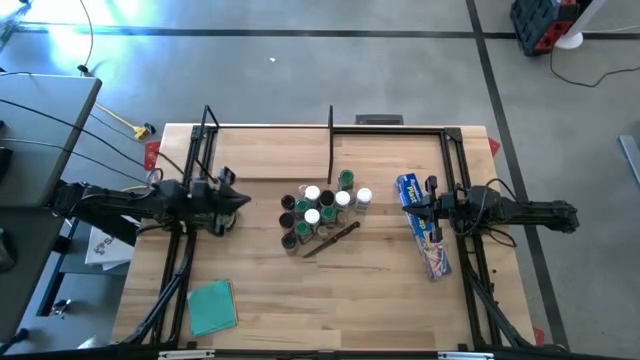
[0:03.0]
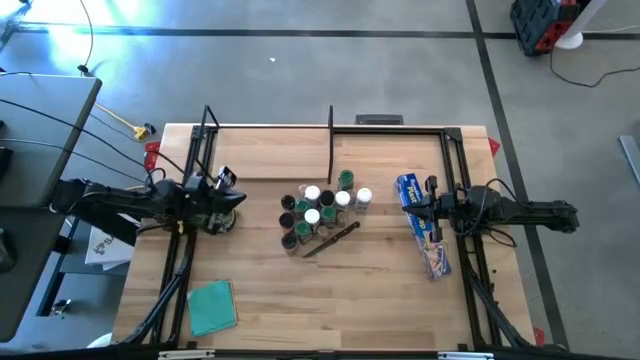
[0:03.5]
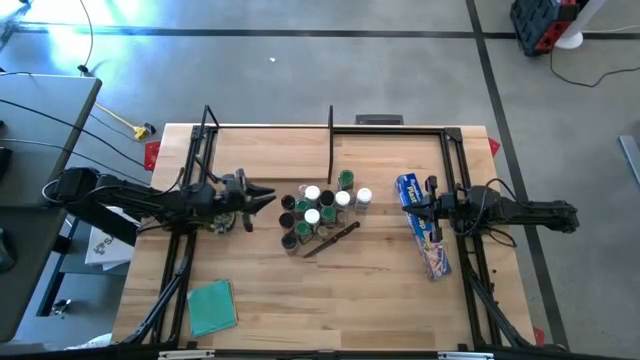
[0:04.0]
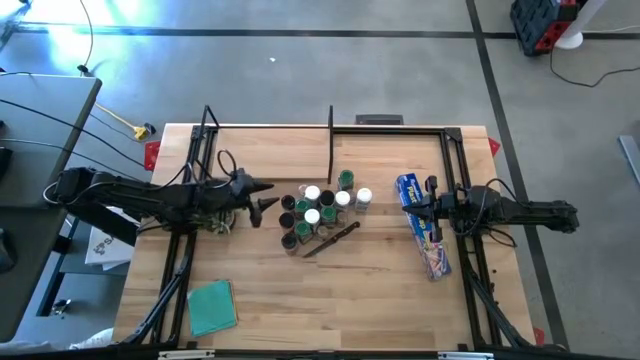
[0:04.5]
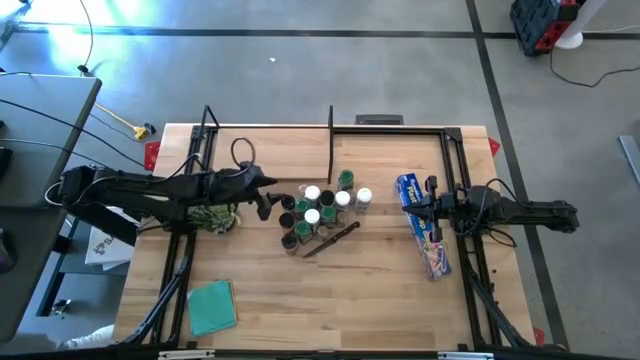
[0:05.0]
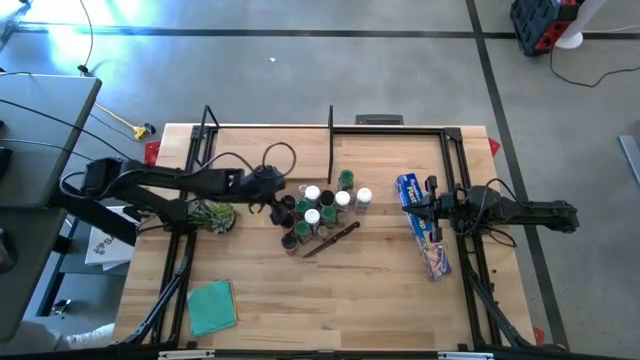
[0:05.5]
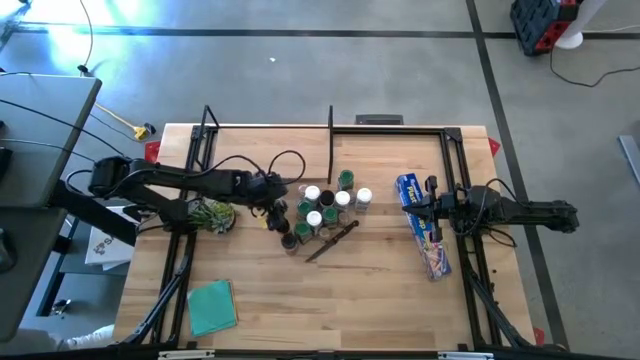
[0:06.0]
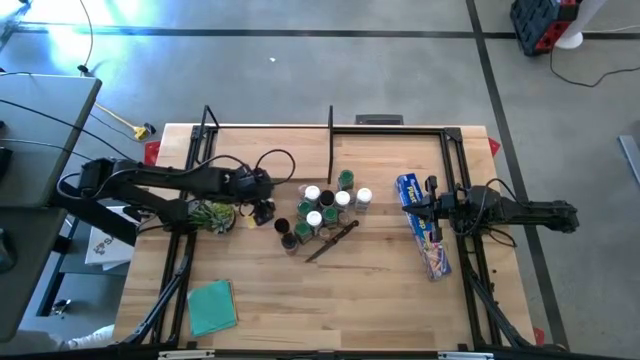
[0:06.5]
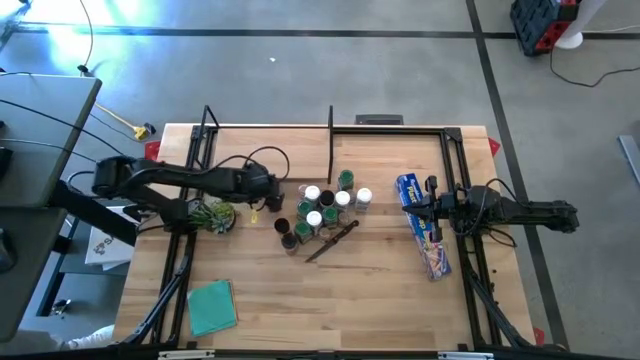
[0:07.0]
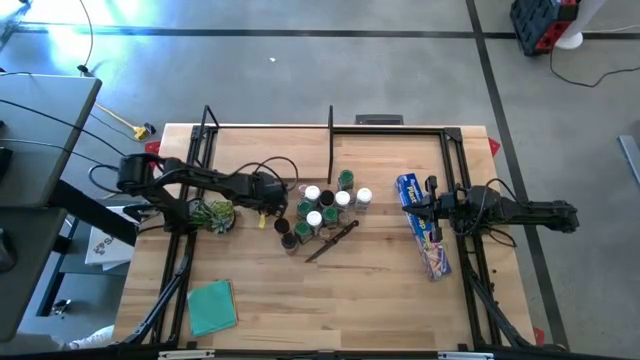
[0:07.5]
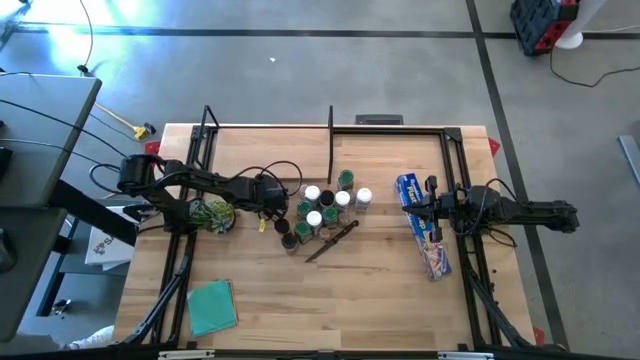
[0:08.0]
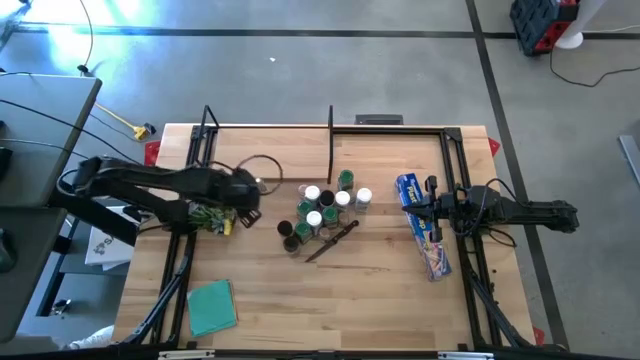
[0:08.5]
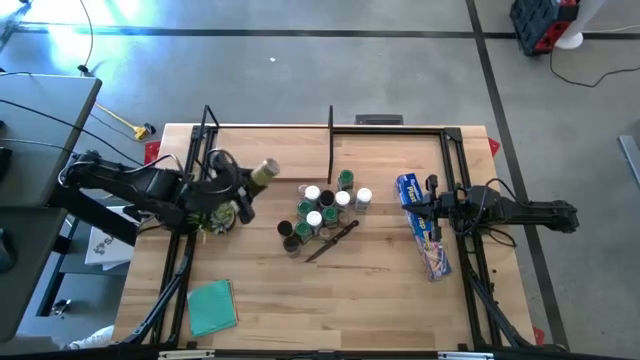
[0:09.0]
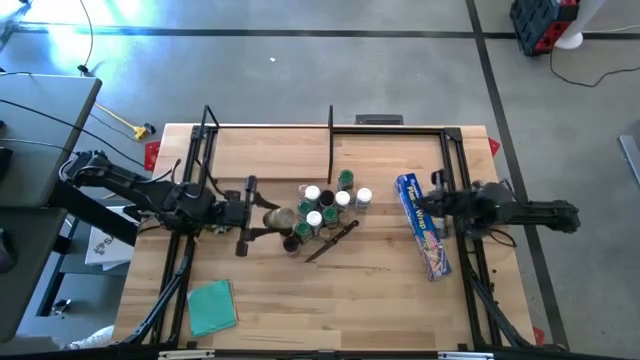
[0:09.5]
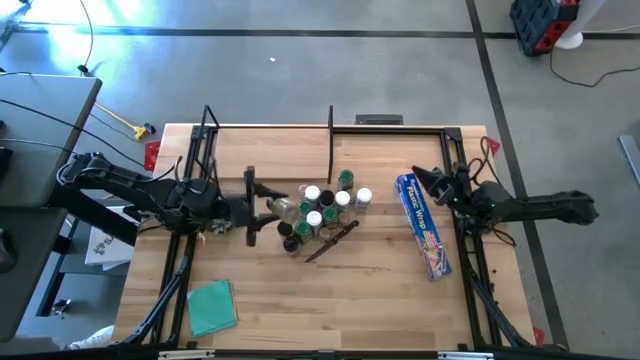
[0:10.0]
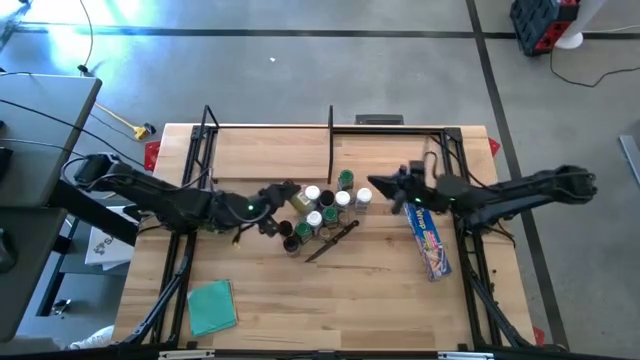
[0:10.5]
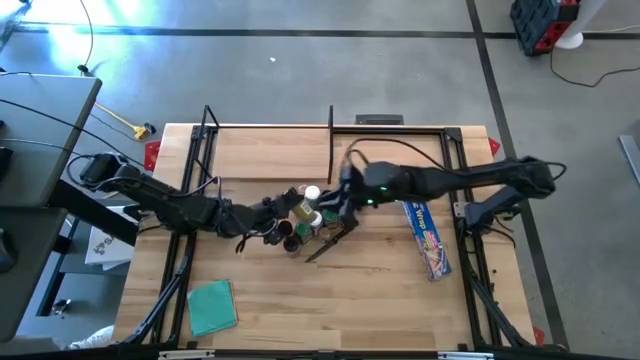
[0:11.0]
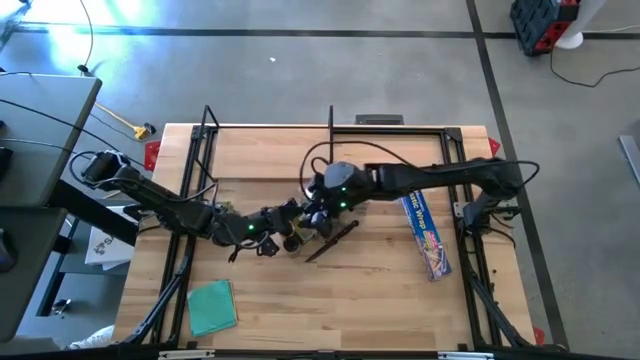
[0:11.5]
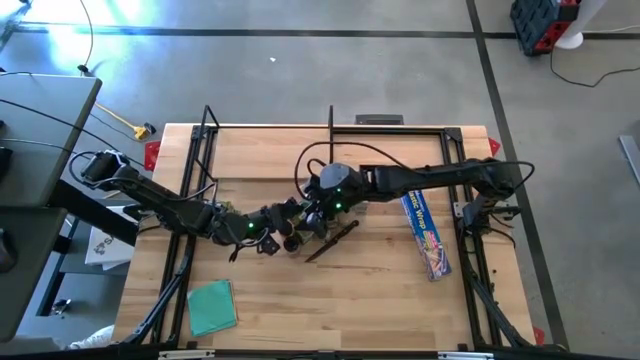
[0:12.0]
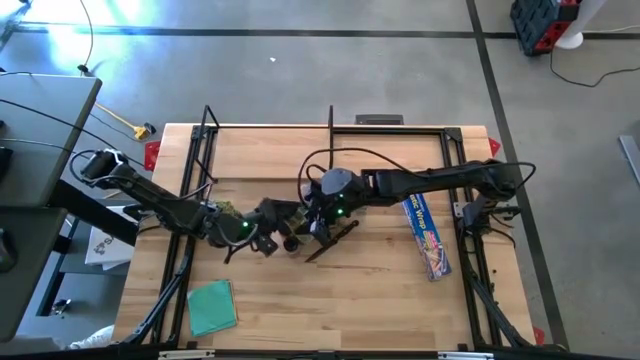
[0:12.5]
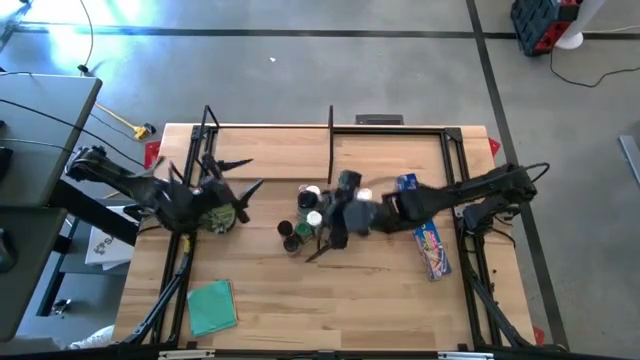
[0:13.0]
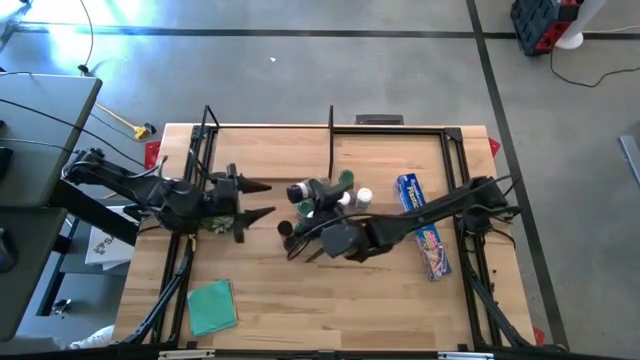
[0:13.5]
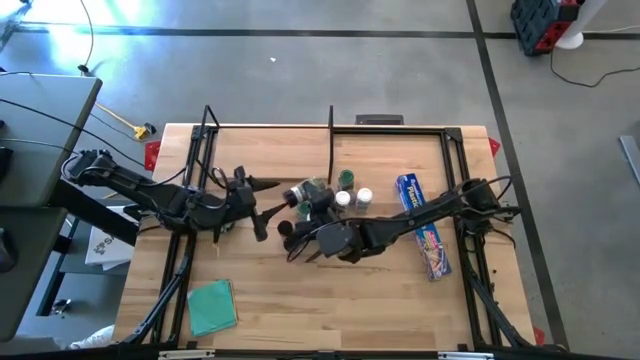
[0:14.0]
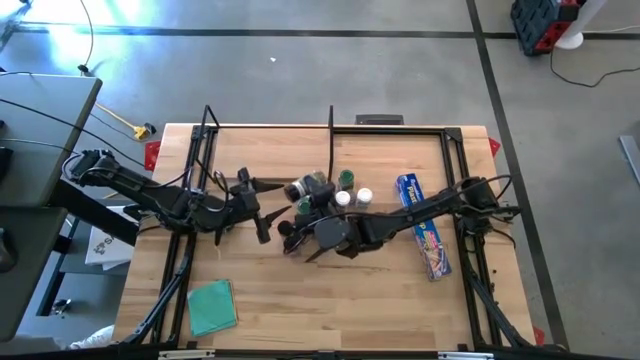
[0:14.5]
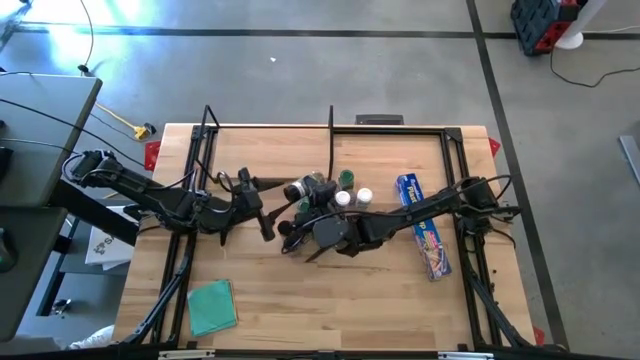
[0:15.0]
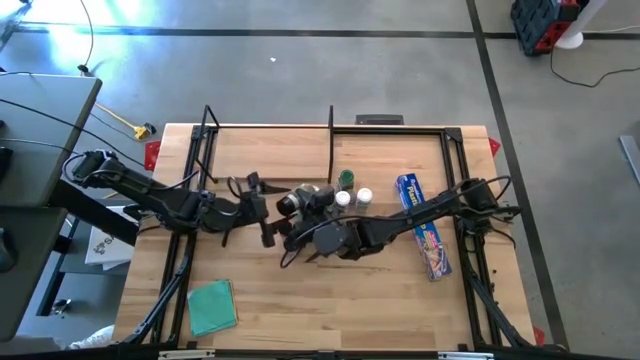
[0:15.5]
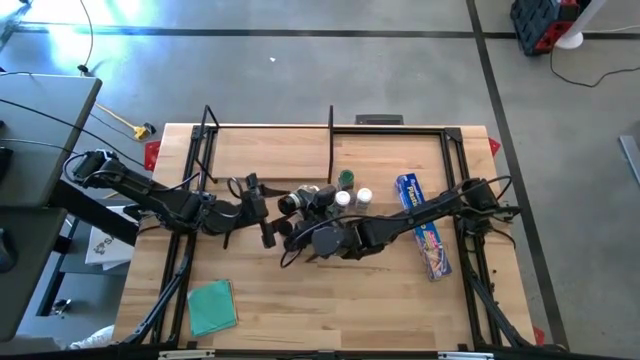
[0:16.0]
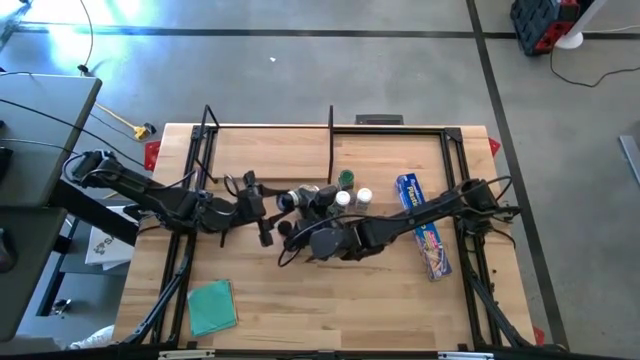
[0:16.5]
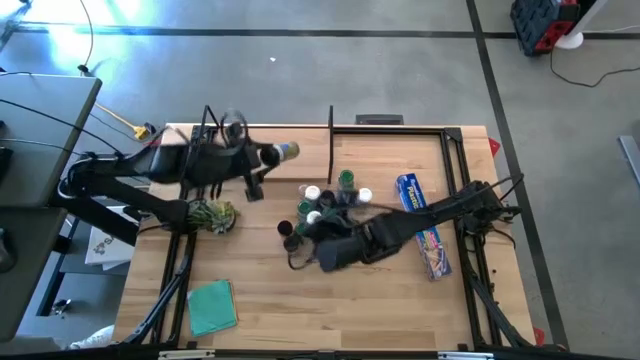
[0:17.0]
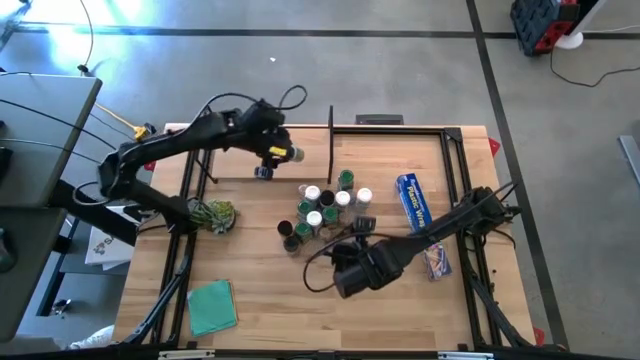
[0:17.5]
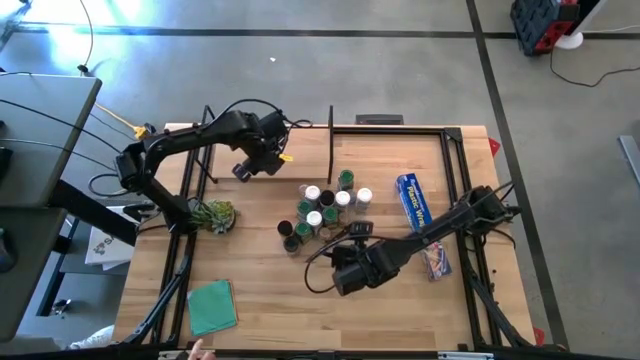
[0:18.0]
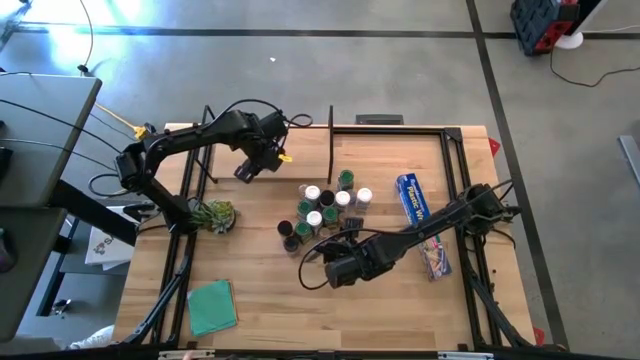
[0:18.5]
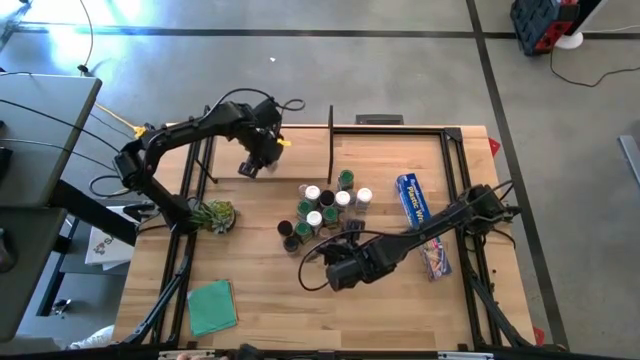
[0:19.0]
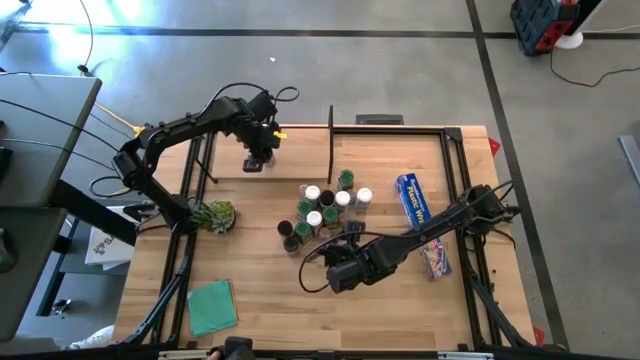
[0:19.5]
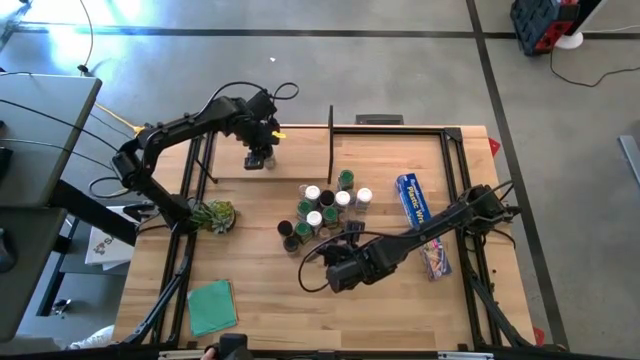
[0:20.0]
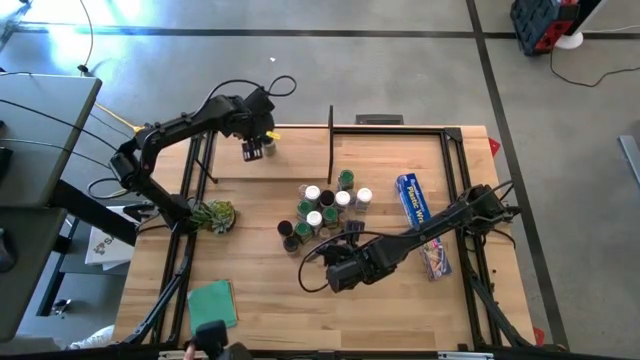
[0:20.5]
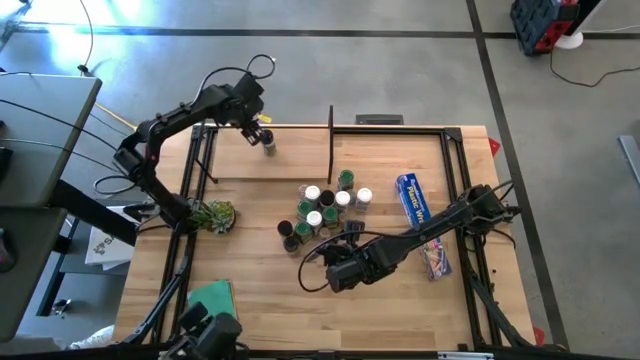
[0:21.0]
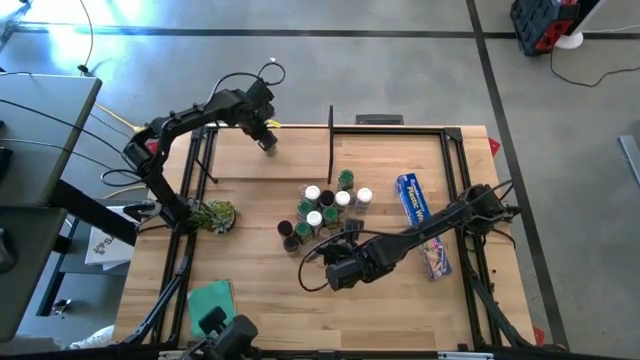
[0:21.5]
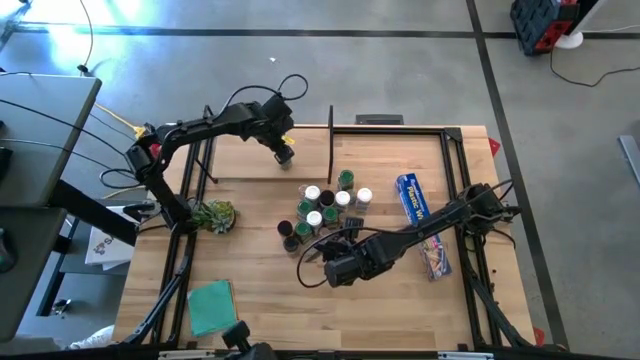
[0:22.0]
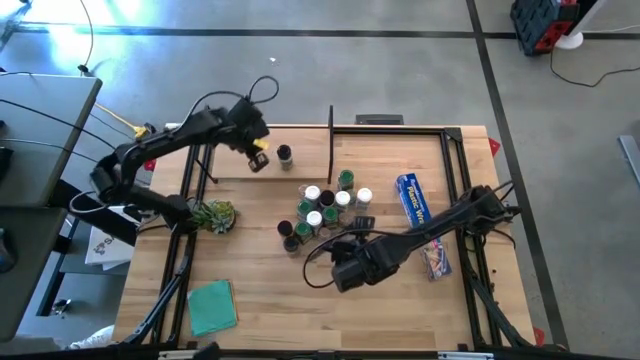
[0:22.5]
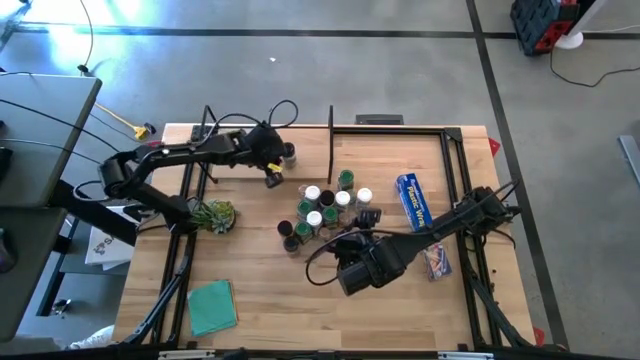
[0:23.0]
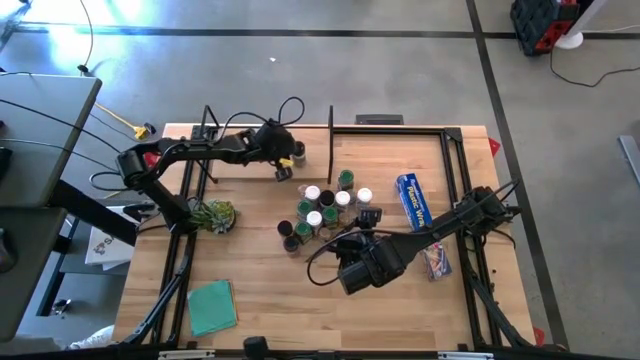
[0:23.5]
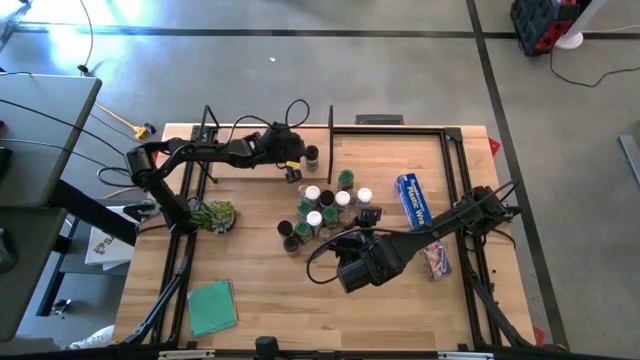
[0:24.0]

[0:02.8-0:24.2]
Task: Shelf spices
Put the black lid seasoning bottle on the shelf
